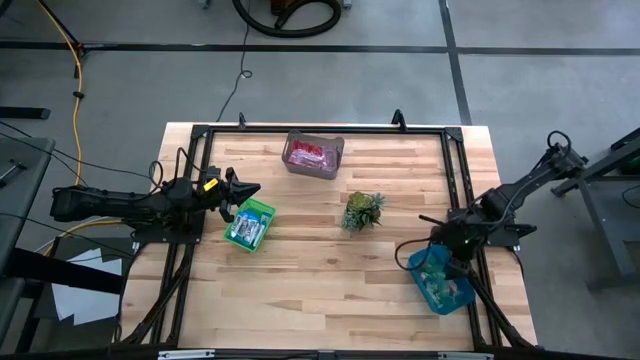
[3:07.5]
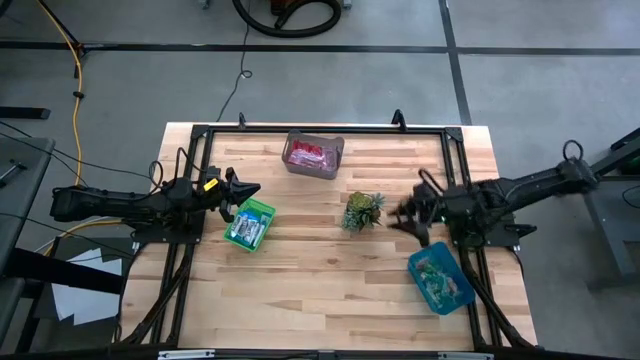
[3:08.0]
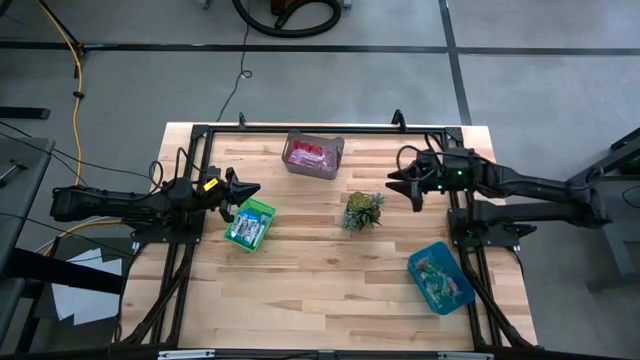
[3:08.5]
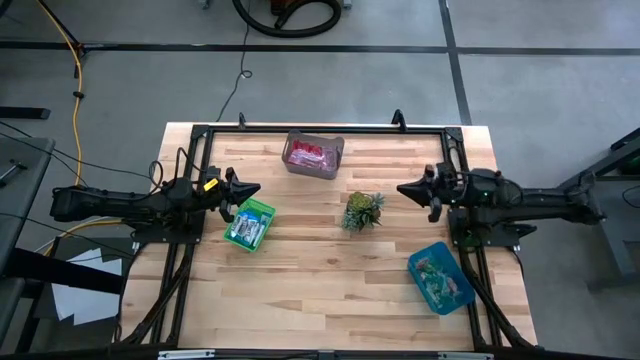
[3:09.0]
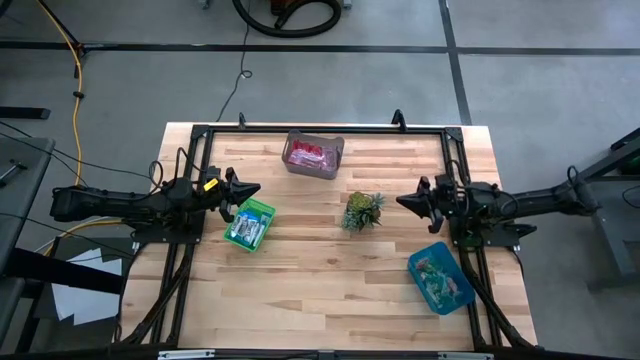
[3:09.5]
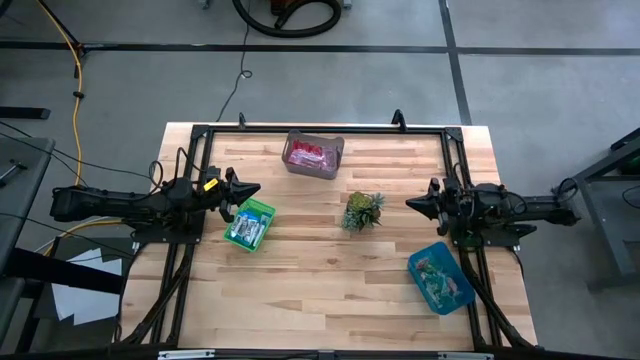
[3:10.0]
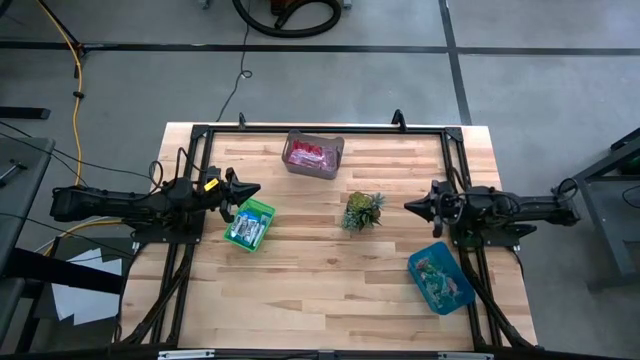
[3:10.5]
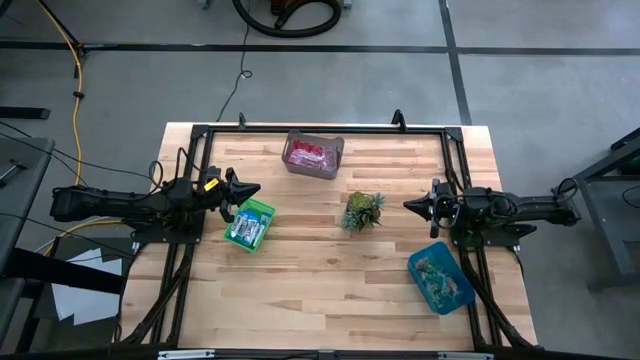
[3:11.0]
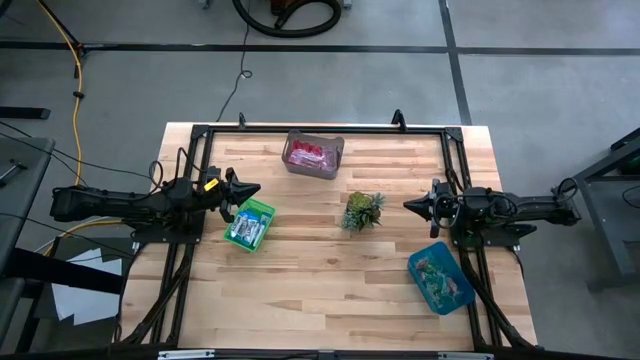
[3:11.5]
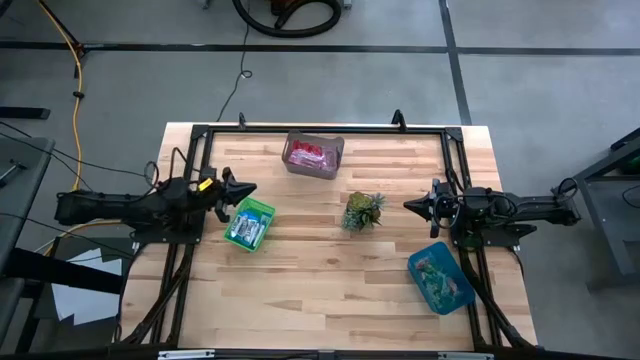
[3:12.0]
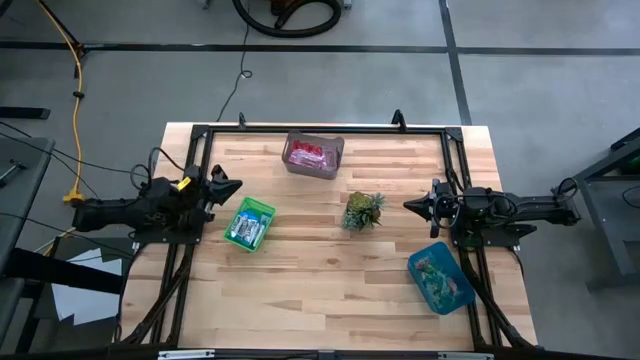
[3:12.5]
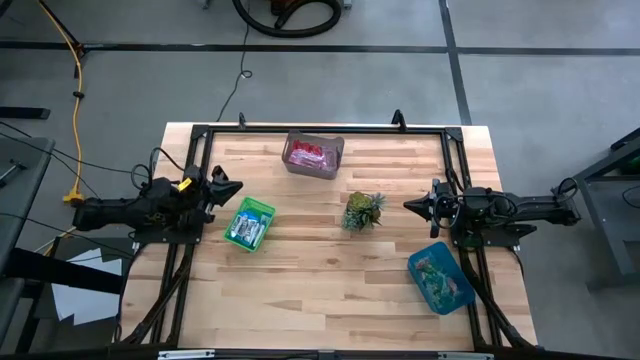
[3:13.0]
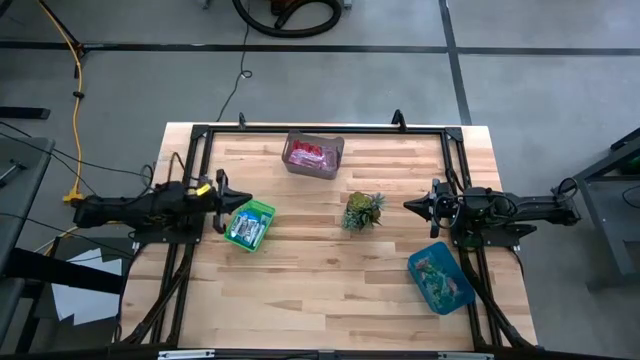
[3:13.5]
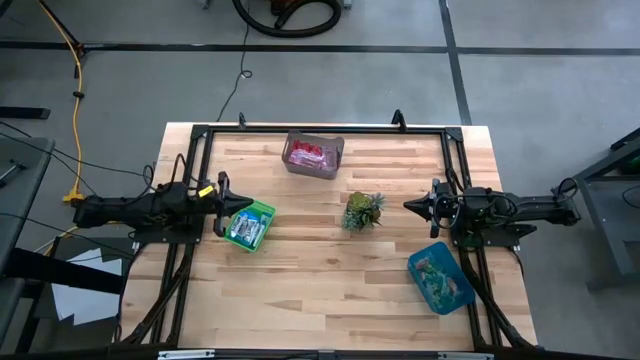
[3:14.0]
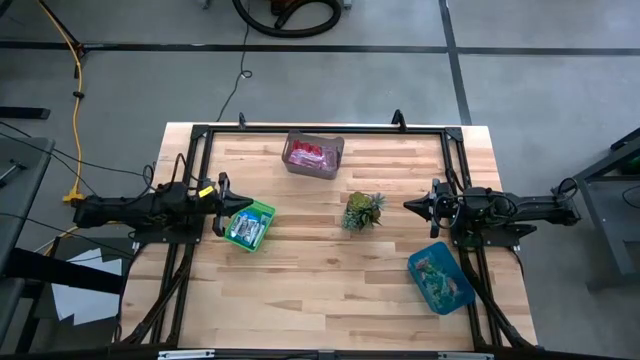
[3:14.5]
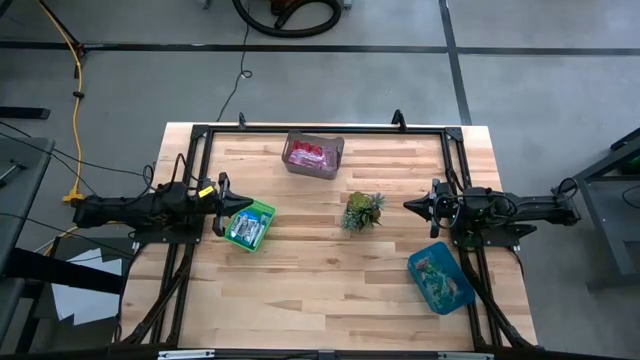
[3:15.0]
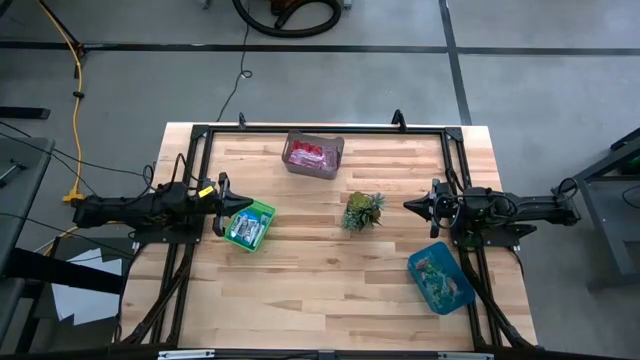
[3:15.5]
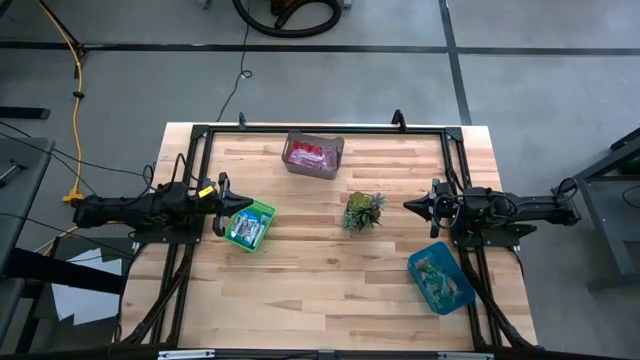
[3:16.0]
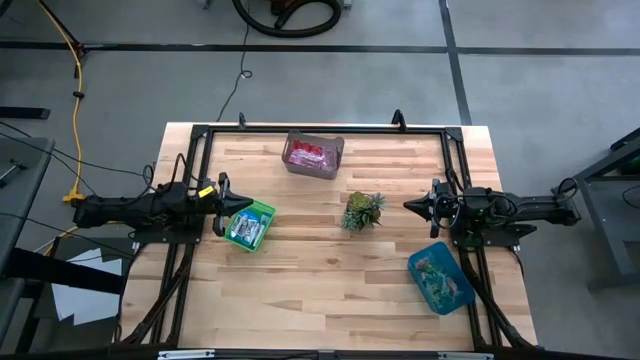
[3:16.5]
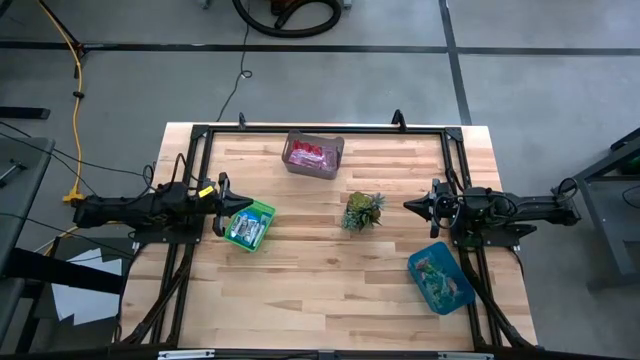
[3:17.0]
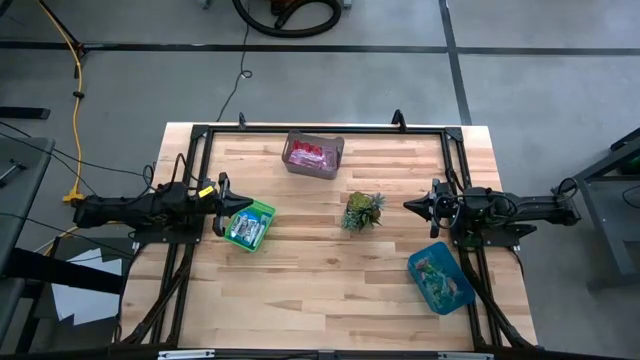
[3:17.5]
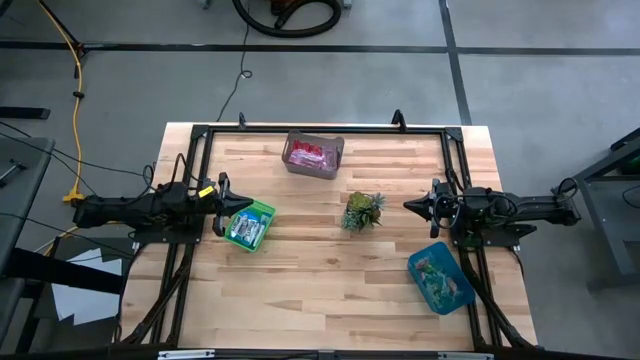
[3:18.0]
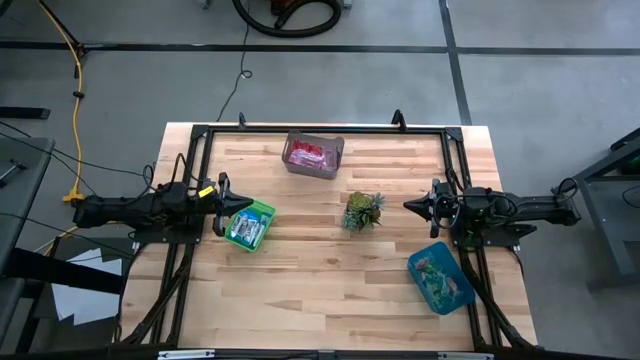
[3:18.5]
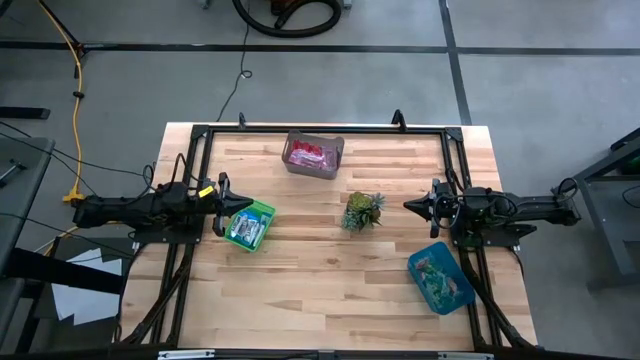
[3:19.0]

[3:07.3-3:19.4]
Task: Sort candy
Return to Home Position

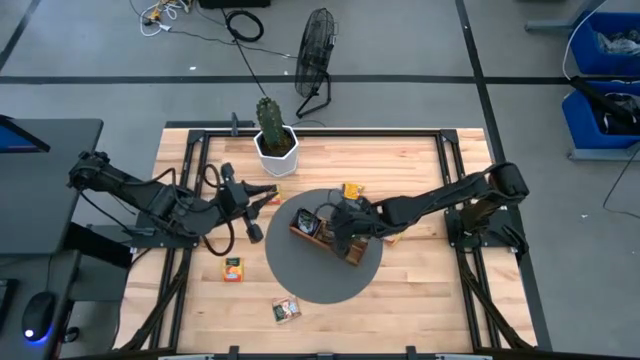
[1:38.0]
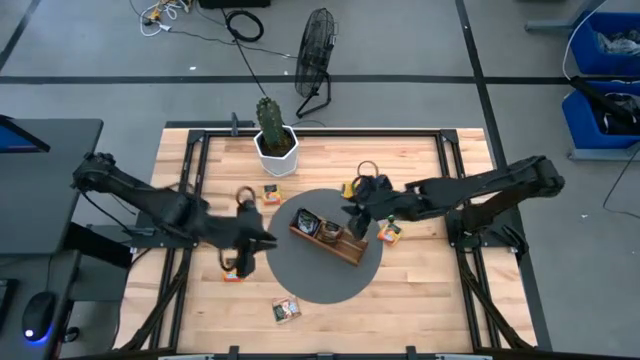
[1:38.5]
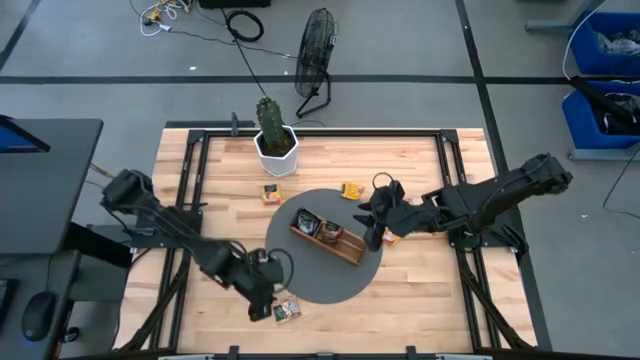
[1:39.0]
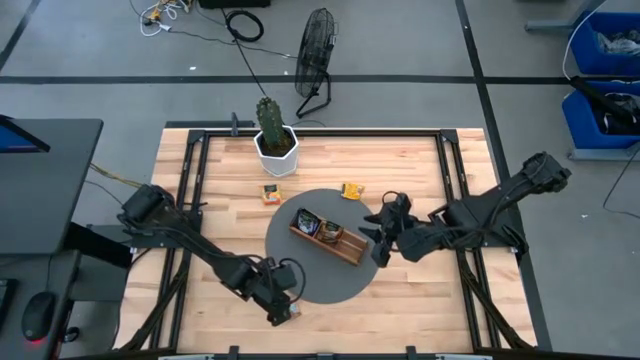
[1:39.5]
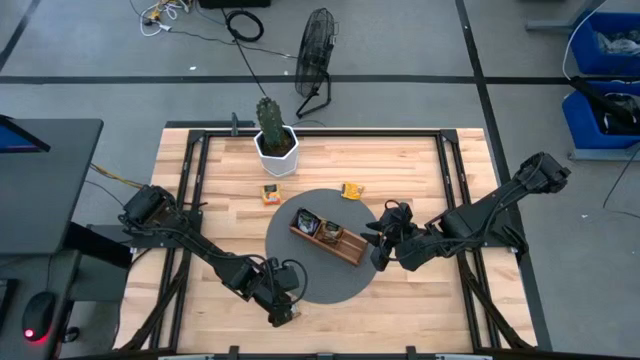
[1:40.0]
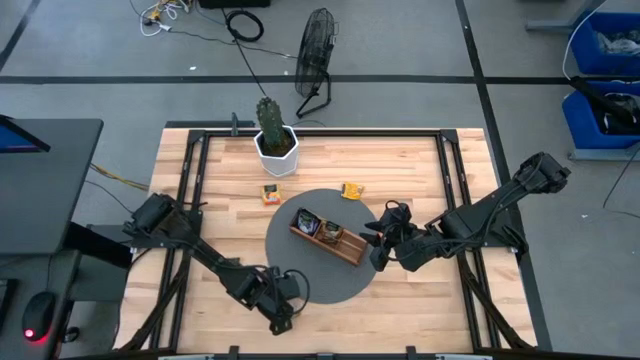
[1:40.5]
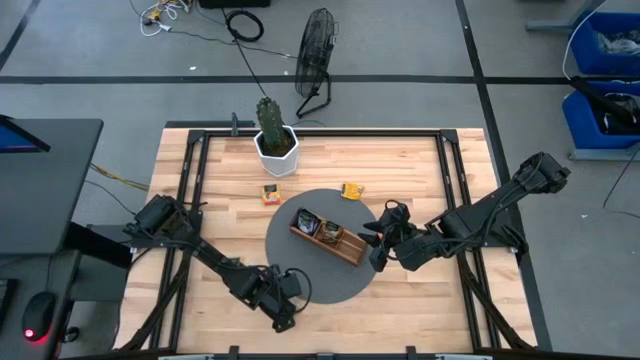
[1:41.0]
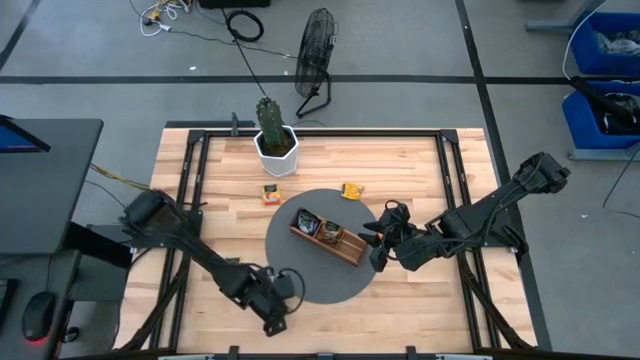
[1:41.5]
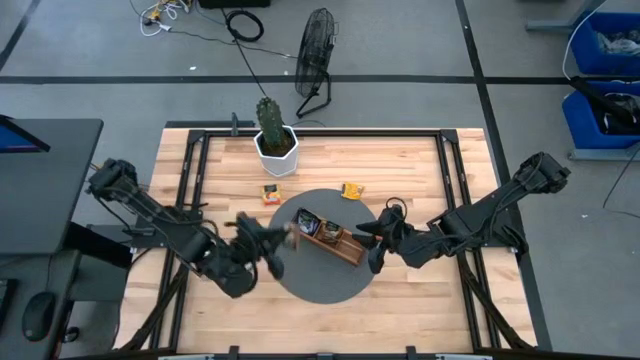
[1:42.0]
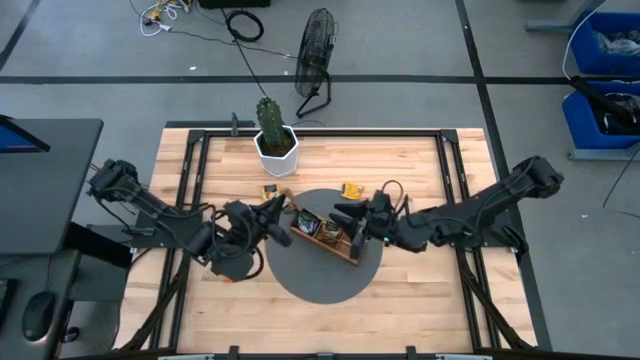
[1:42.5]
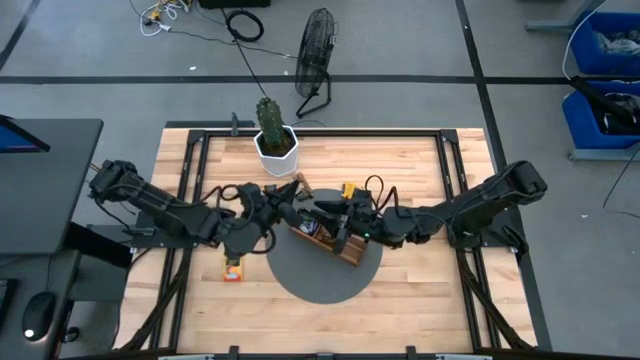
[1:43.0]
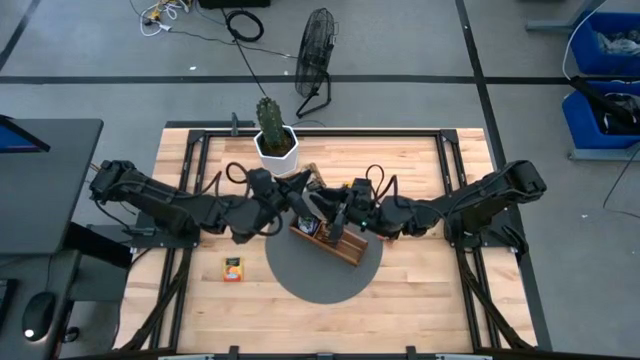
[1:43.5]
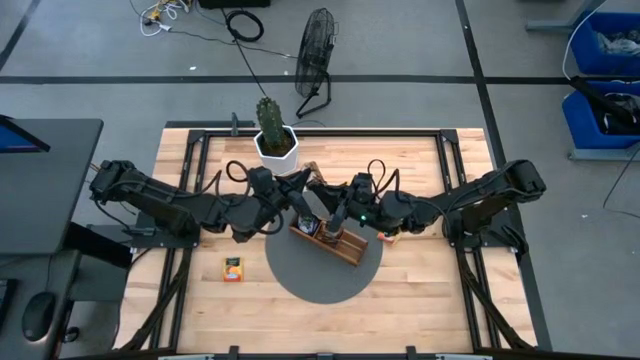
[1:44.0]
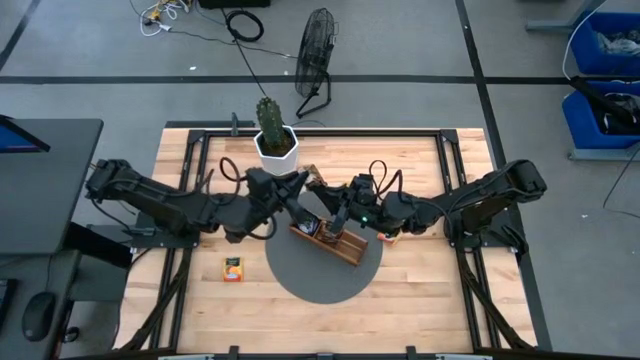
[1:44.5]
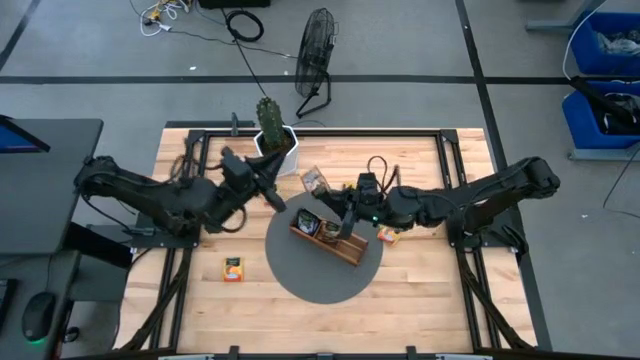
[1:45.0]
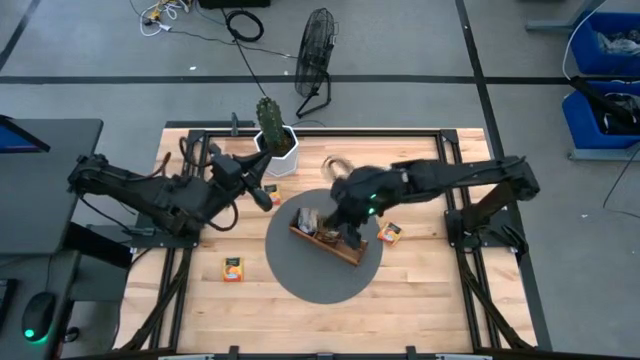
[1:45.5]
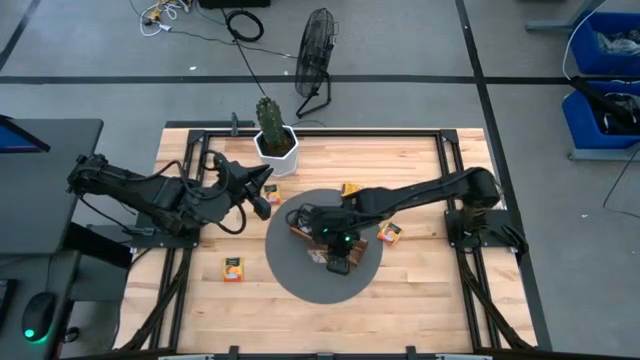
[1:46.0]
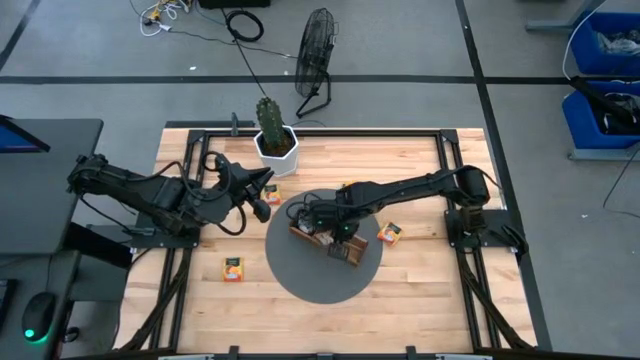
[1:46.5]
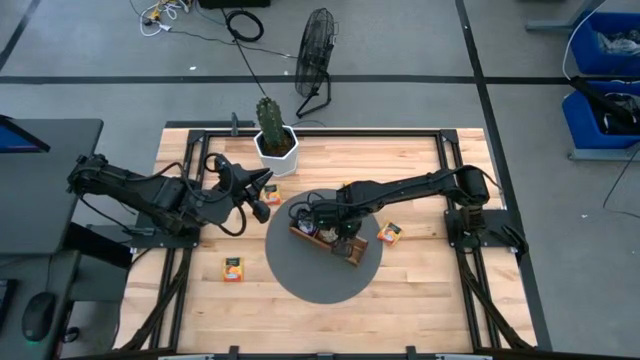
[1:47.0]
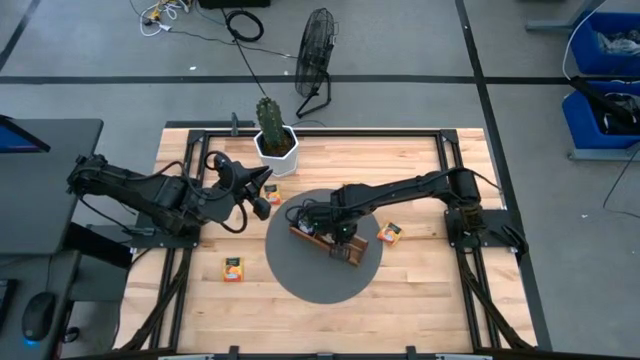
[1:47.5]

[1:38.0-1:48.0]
Task: Pick & Place Tea
Put the brown tea bag into the middle section of the wooden organizer
